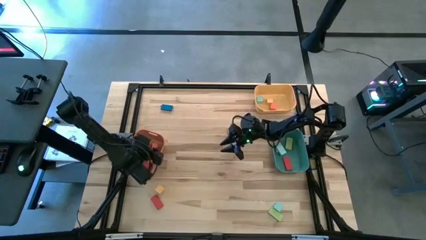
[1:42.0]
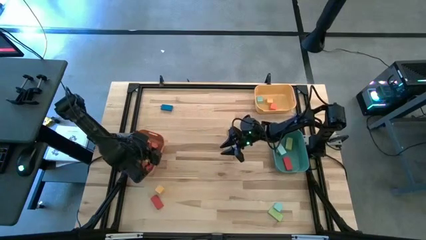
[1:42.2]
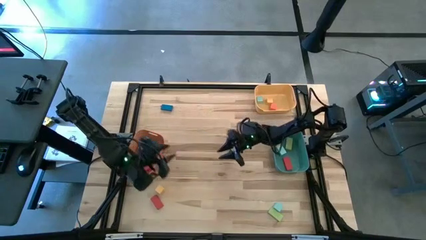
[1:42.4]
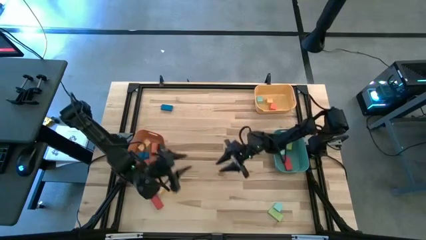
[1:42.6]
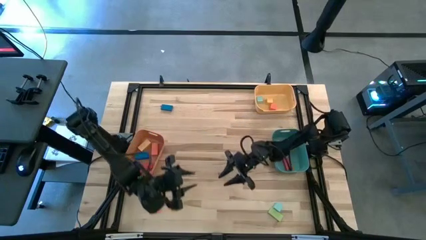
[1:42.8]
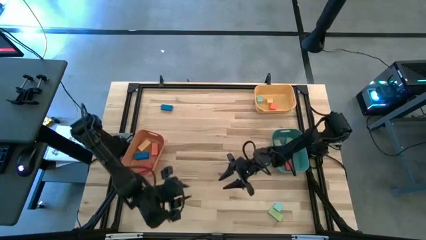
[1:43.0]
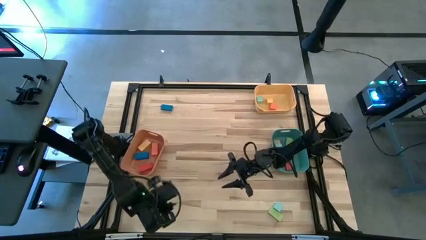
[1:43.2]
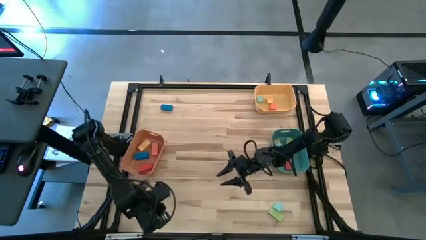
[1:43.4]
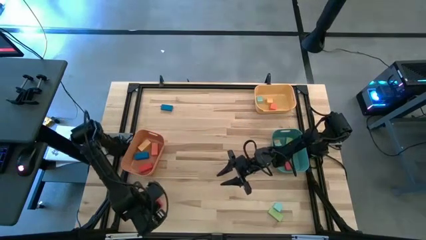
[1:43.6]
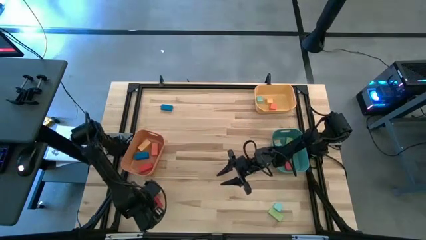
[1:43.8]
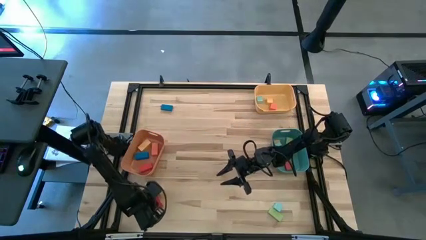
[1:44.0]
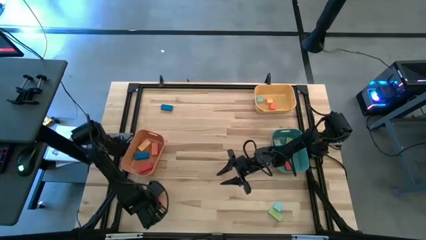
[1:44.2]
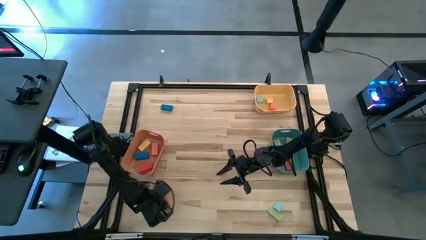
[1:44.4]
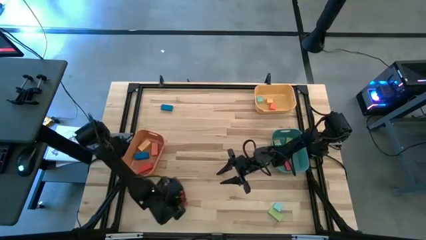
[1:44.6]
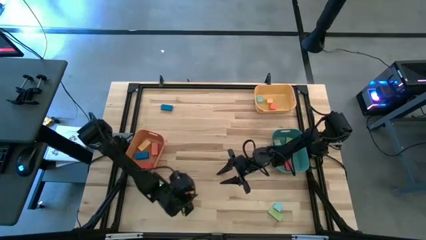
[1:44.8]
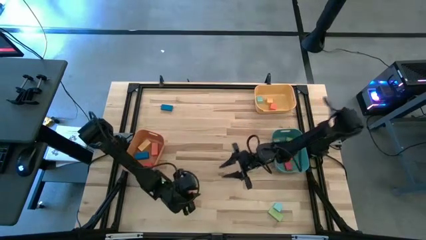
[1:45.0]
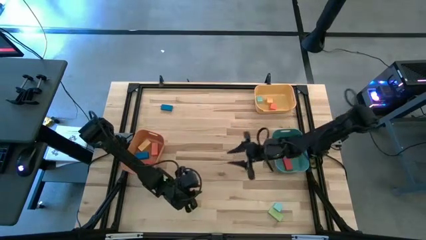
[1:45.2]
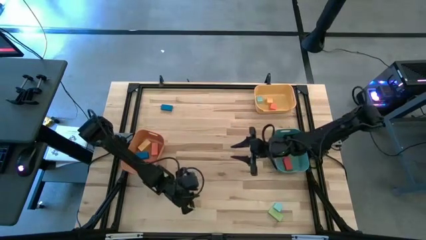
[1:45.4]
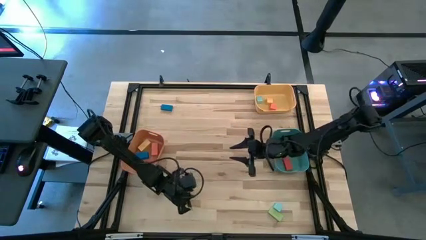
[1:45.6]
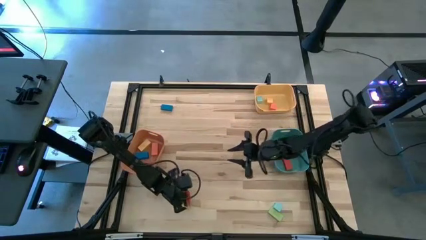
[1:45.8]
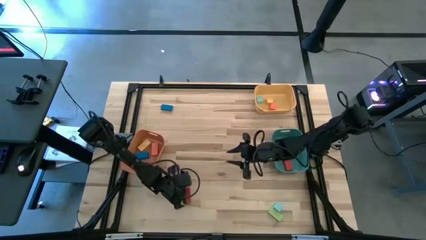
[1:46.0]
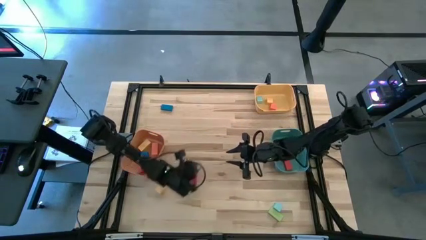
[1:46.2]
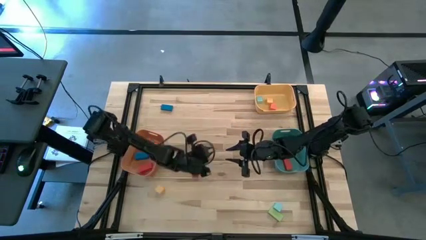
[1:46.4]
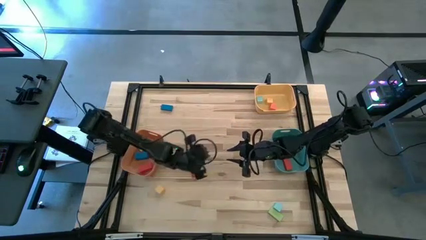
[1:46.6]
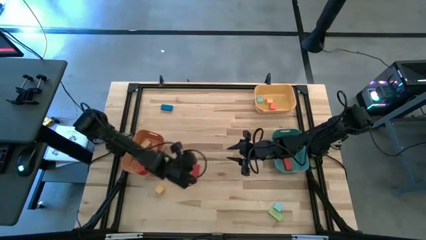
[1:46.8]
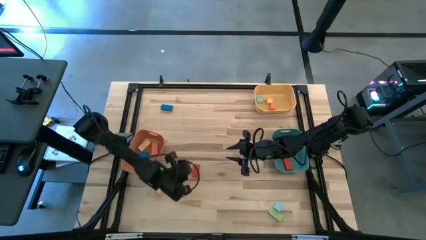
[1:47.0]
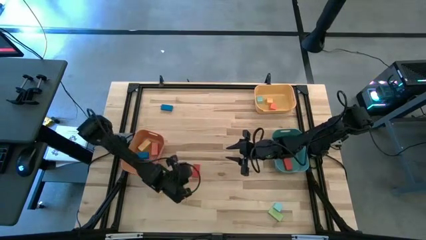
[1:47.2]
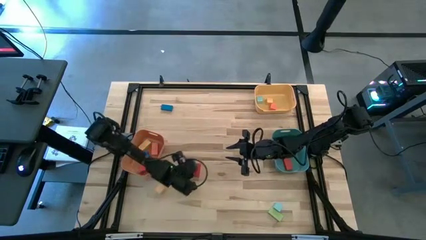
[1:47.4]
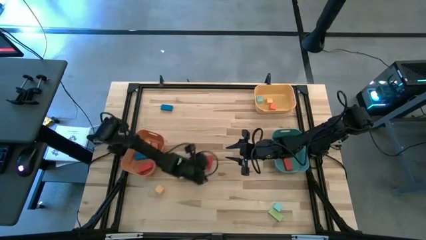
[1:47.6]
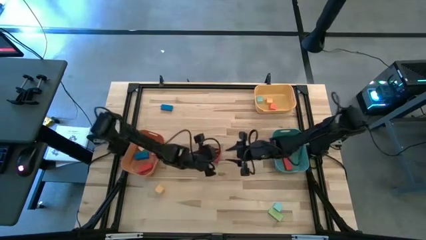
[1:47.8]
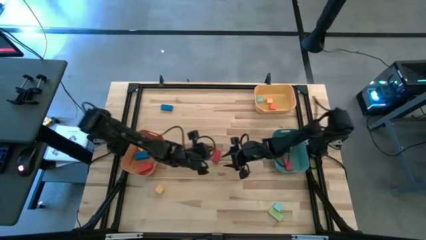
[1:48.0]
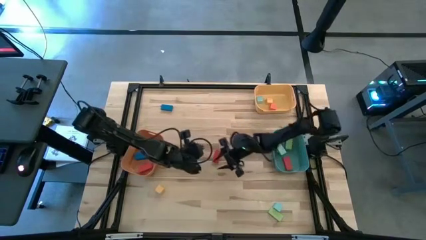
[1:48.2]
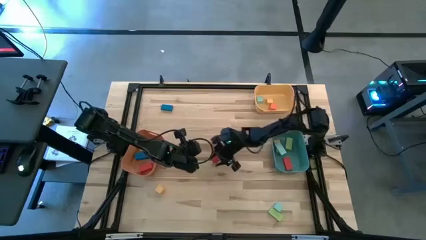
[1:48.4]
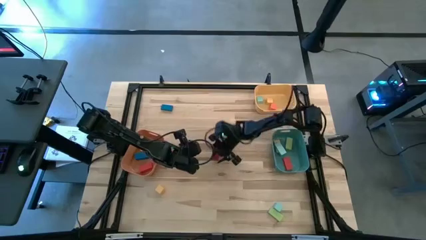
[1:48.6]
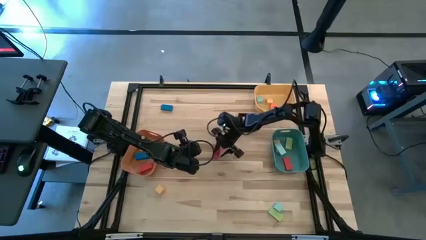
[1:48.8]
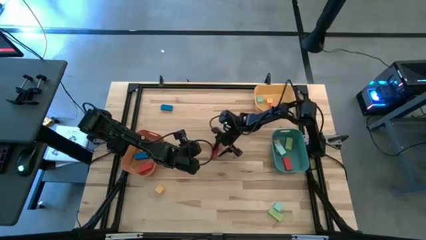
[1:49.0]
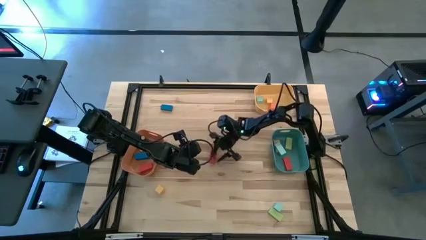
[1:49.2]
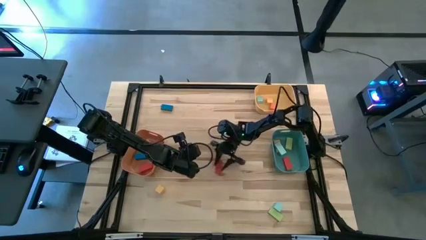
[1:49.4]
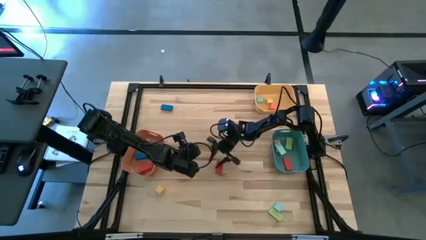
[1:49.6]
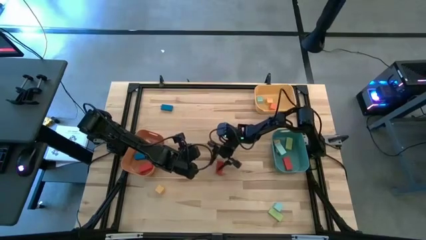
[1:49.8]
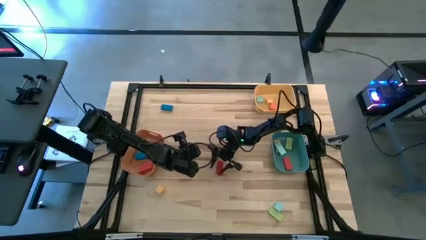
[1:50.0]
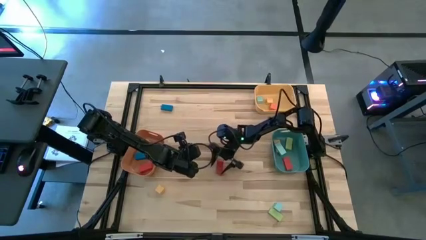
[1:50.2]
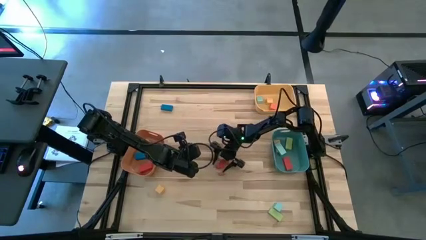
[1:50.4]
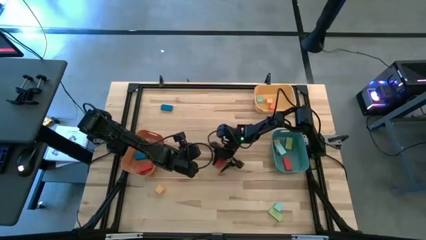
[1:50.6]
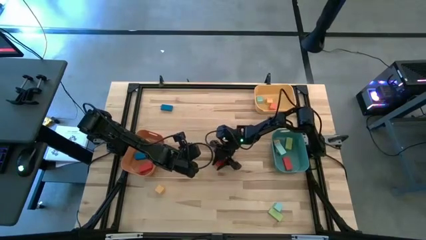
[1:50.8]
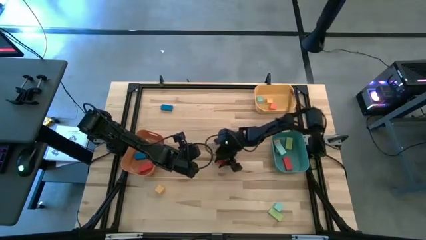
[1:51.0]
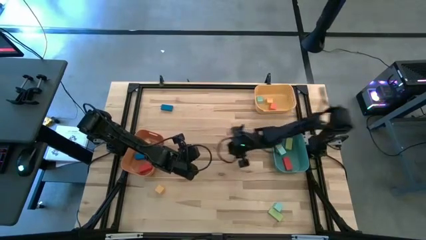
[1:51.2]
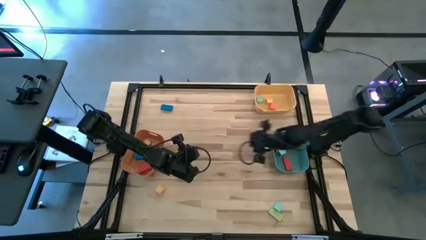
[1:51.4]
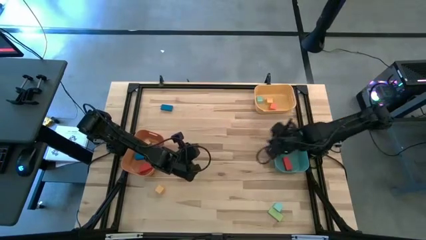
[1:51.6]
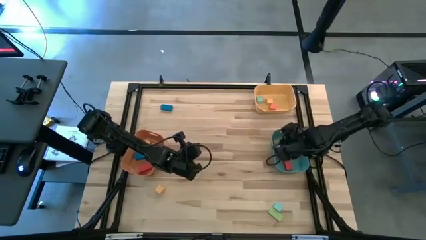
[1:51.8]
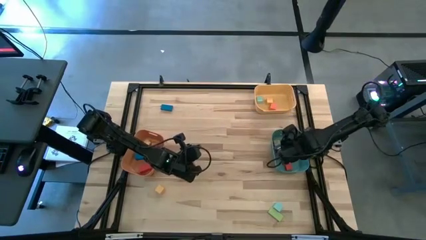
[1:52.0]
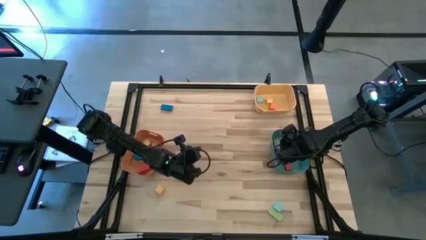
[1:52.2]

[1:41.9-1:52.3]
Task: Sort blocks by size
Put the thin red rectangular block into the green bin

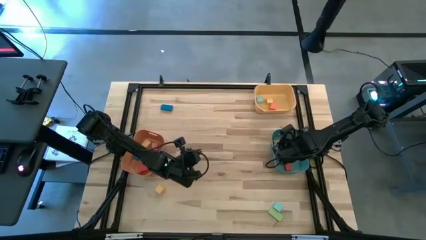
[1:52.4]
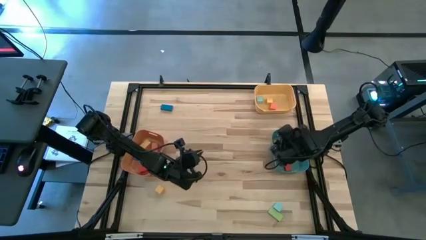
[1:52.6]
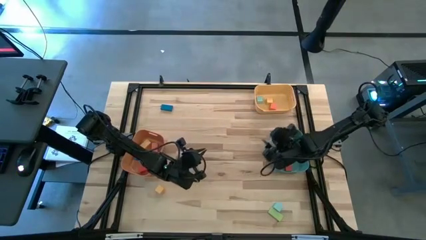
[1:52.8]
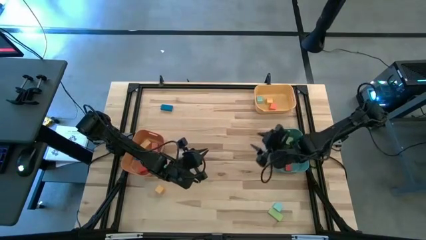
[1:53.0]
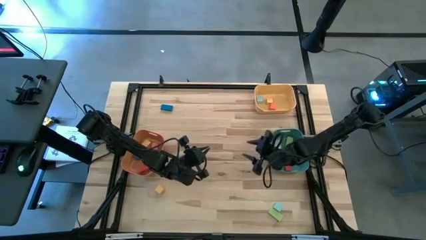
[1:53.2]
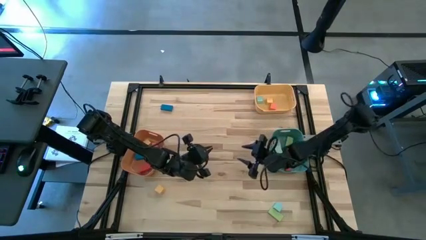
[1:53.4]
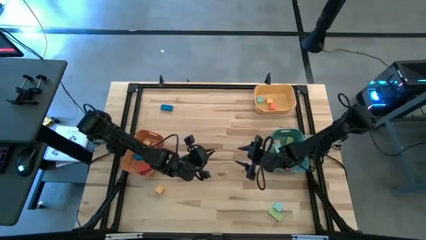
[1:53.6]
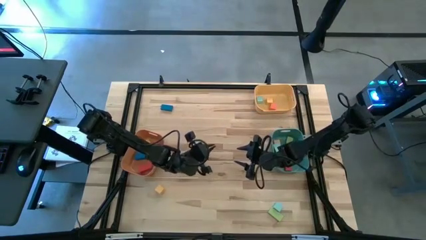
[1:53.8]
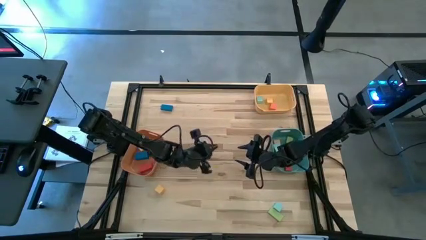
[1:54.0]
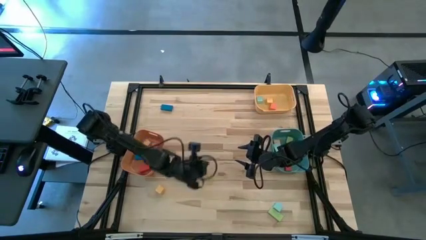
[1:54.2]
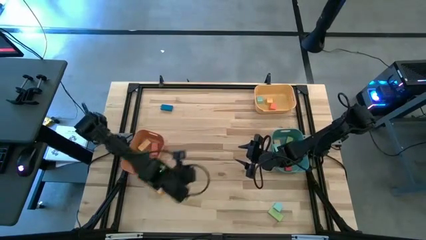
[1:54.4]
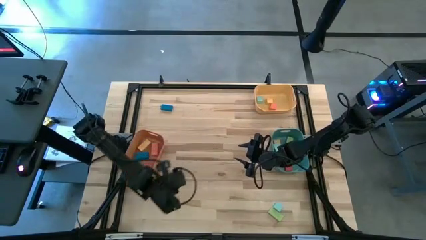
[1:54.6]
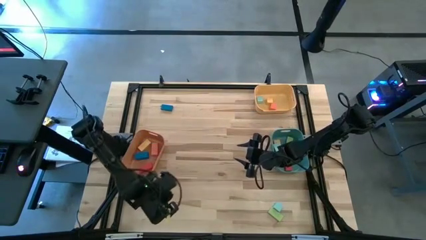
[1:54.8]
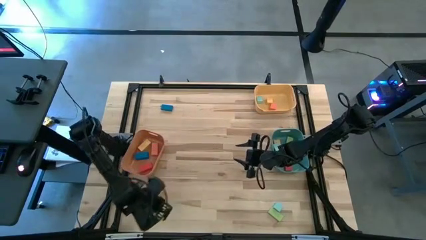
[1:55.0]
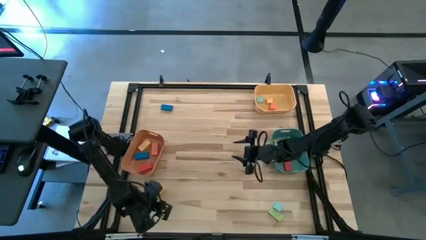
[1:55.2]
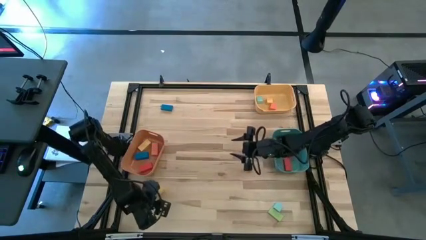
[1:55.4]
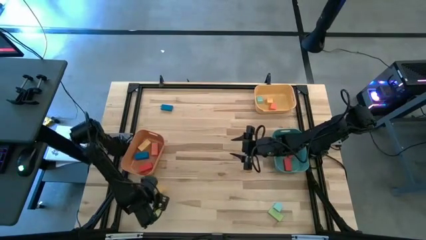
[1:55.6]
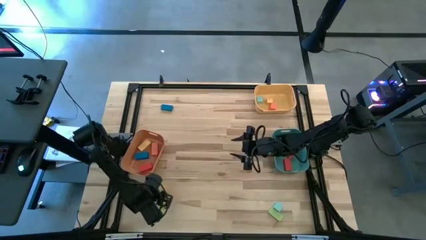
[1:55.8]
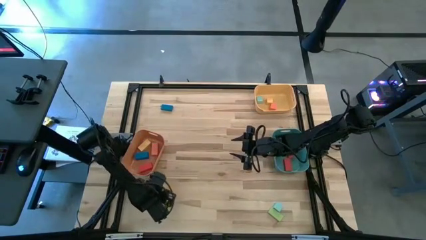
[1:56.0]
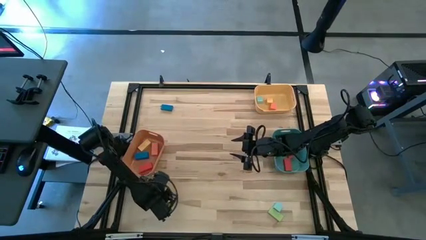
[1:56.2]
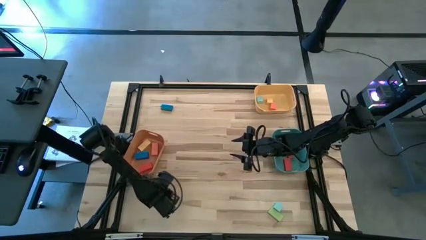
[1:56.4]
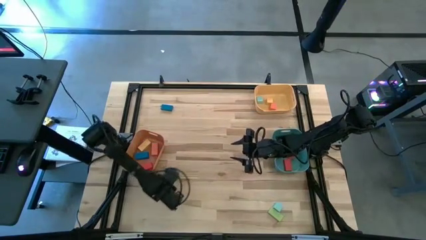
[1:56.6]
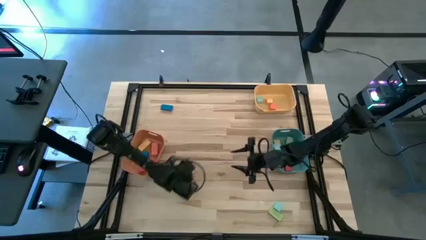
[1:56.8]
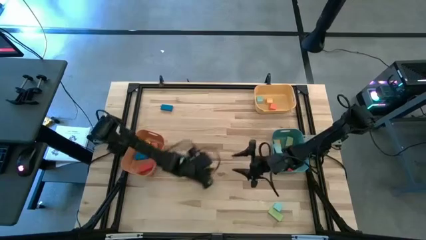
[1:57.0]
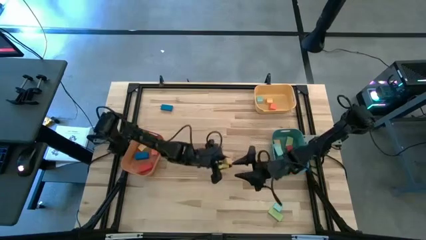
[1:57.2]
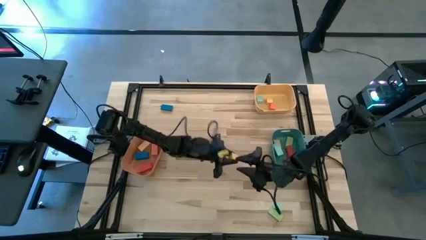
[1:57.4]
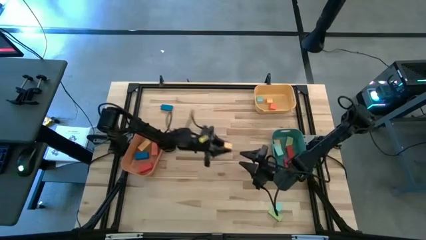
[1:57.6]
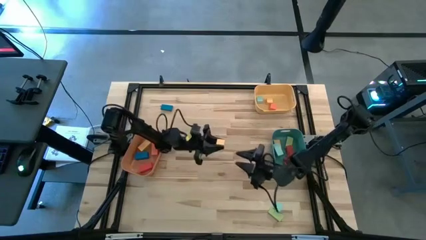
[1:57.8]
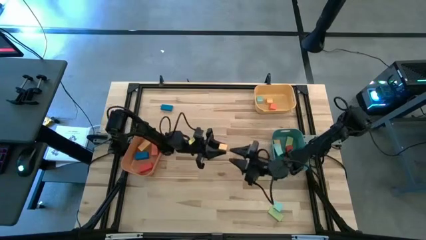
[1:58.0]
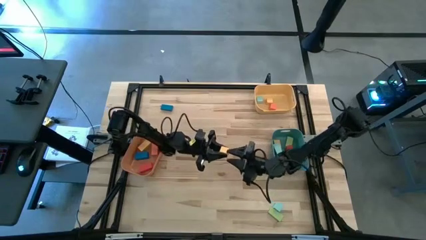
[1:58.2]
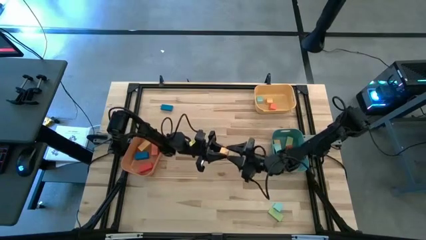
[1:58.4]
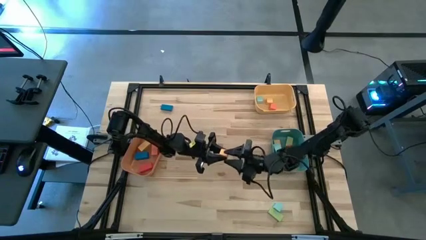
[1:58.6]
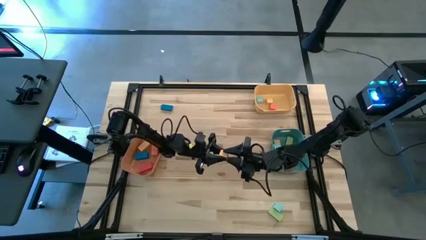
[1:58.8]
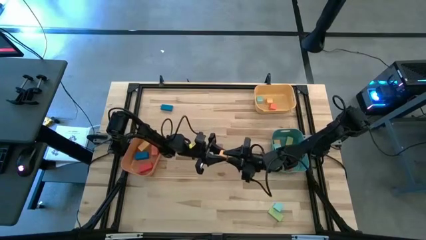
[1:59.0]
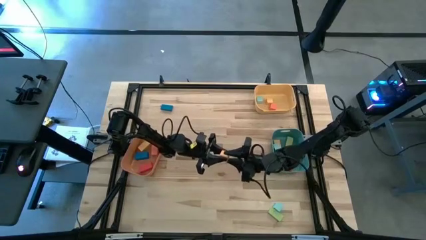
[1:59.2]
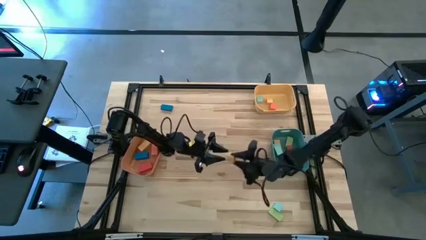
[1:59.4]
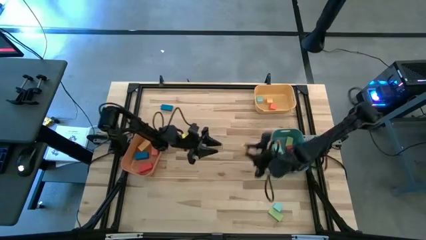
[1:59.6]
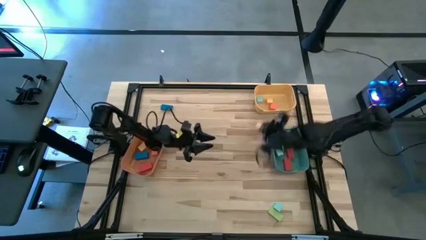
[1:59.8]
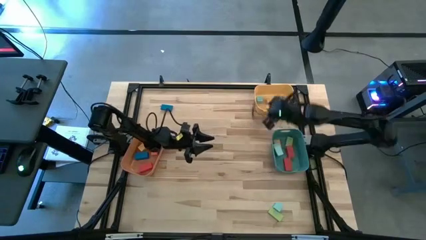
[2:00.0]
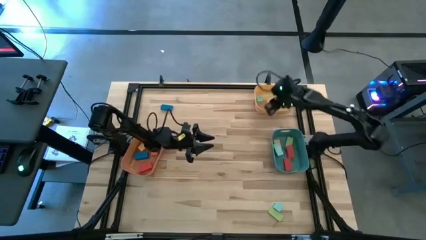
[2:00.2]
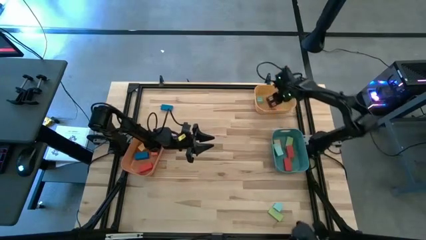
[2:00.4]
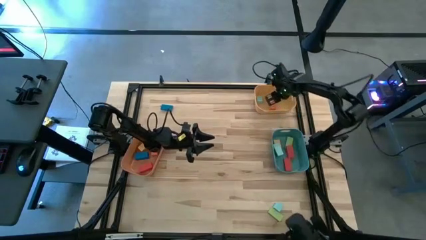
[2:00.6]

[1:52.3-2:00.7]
Put the yellow cube block into the yellow bin
